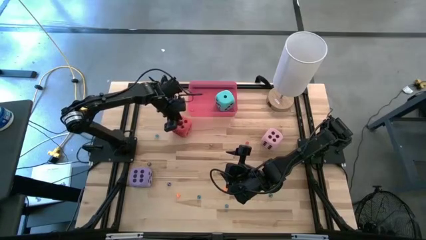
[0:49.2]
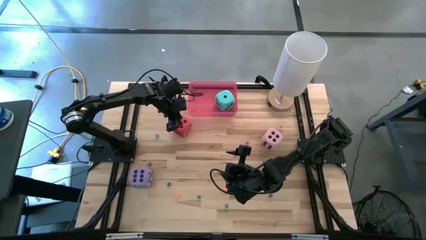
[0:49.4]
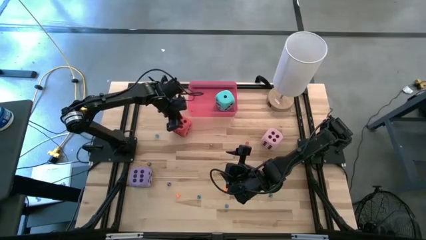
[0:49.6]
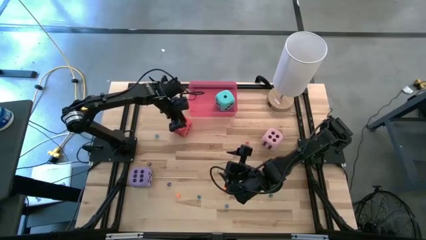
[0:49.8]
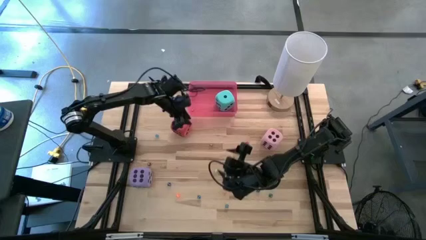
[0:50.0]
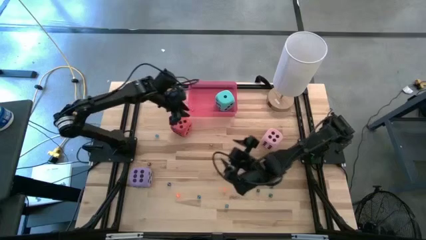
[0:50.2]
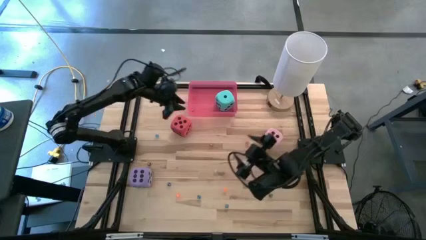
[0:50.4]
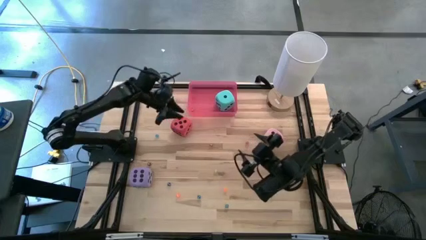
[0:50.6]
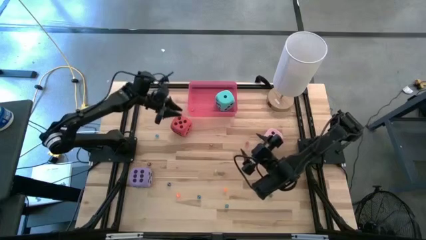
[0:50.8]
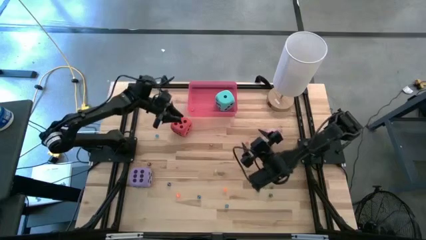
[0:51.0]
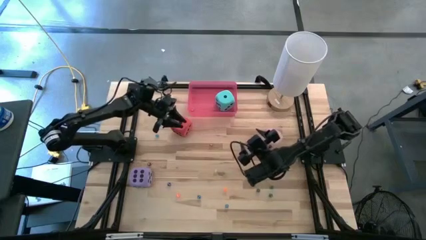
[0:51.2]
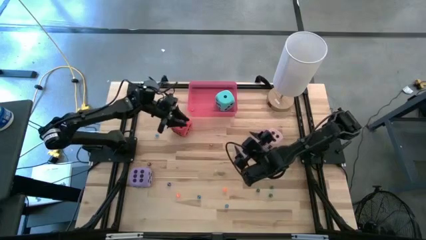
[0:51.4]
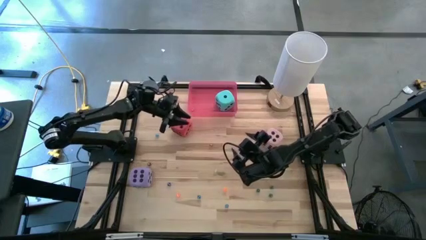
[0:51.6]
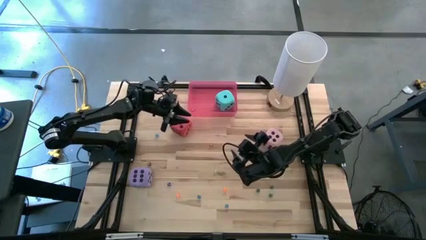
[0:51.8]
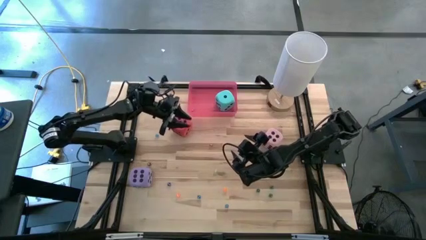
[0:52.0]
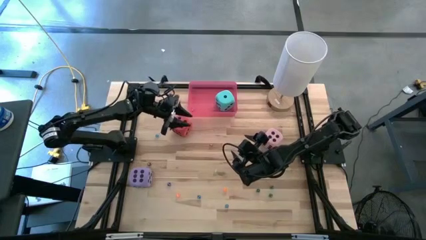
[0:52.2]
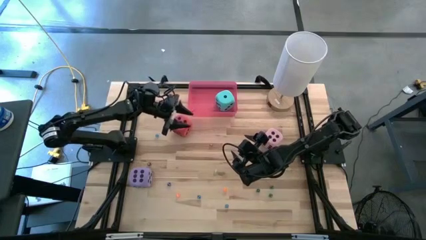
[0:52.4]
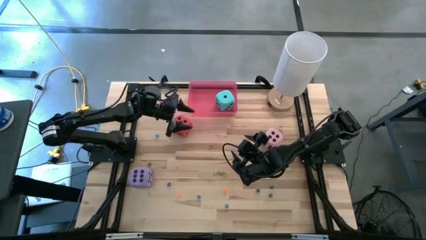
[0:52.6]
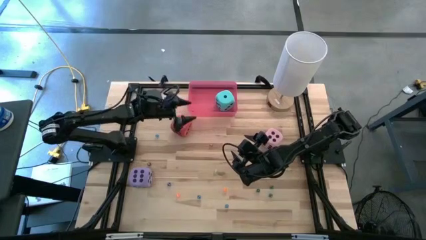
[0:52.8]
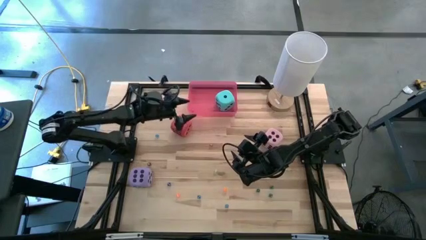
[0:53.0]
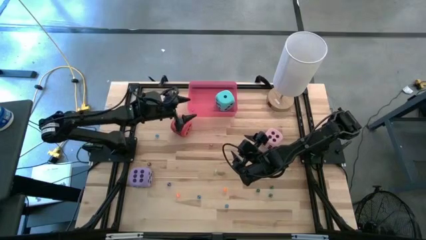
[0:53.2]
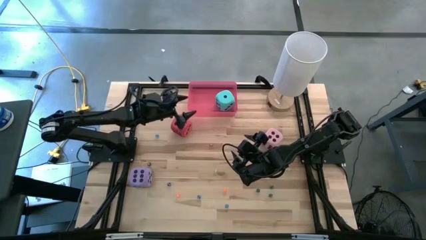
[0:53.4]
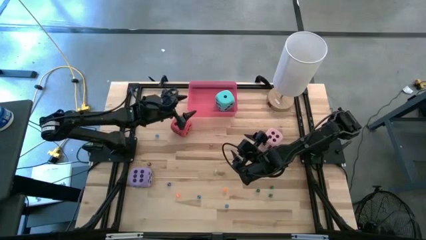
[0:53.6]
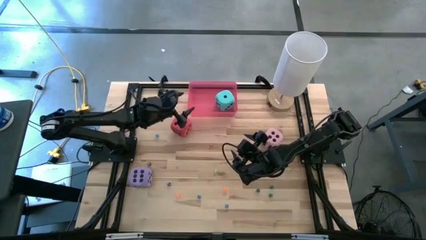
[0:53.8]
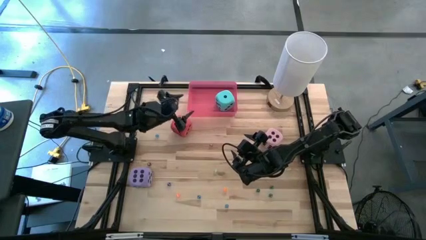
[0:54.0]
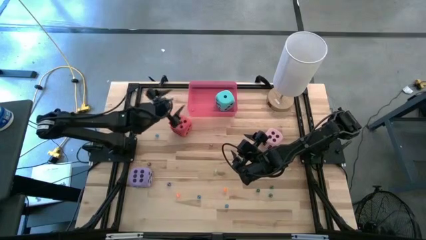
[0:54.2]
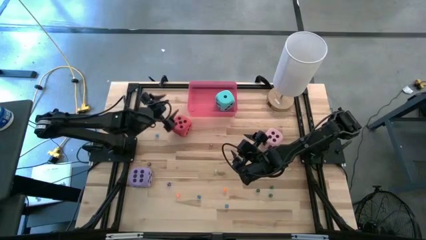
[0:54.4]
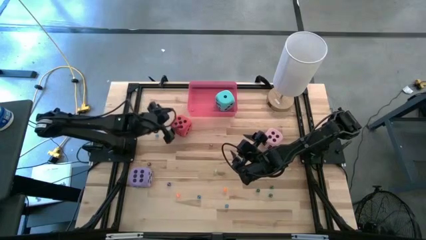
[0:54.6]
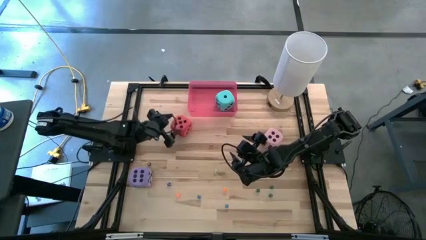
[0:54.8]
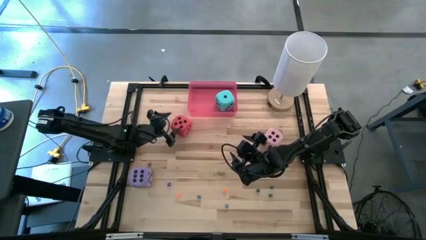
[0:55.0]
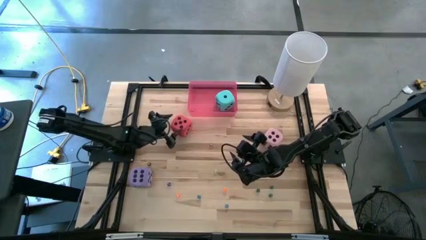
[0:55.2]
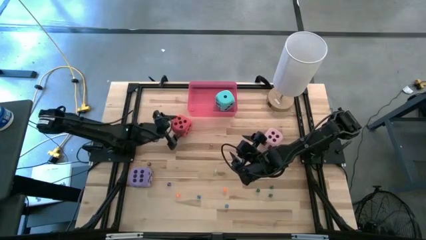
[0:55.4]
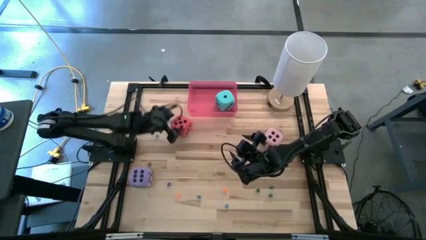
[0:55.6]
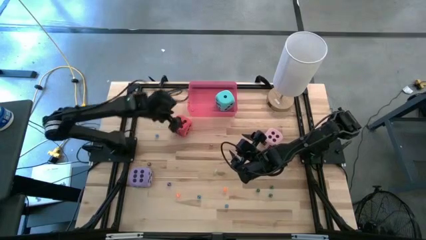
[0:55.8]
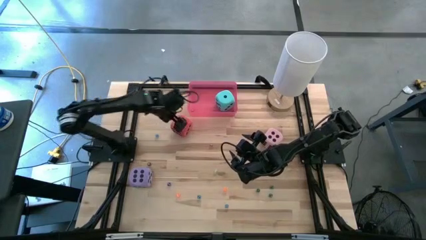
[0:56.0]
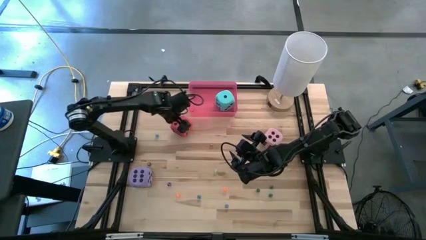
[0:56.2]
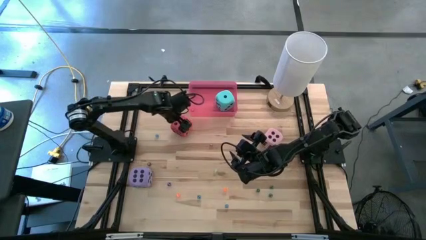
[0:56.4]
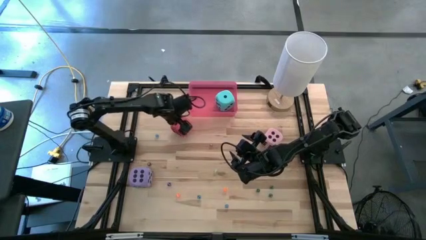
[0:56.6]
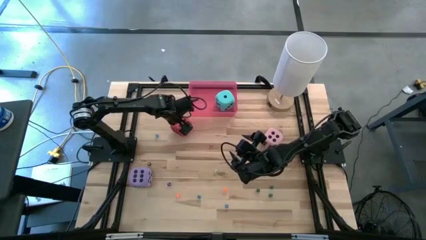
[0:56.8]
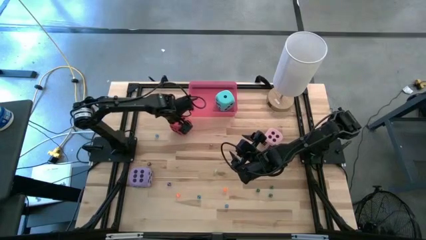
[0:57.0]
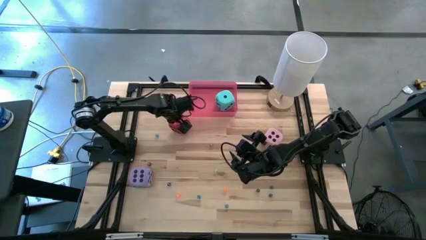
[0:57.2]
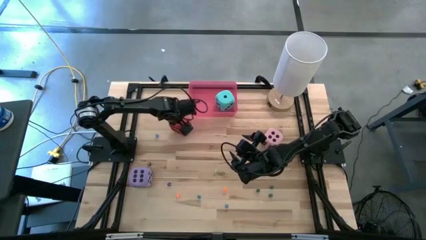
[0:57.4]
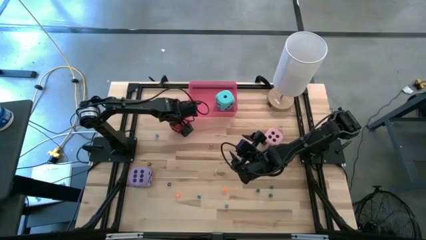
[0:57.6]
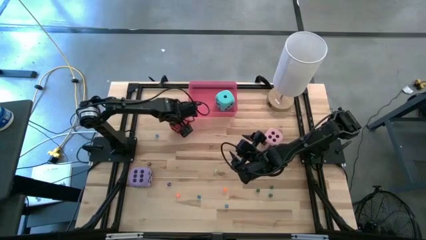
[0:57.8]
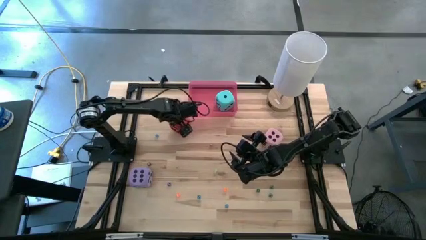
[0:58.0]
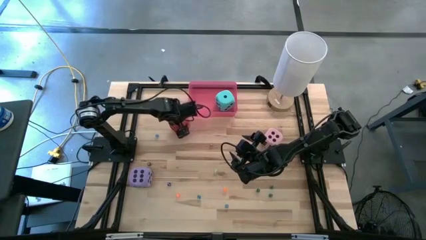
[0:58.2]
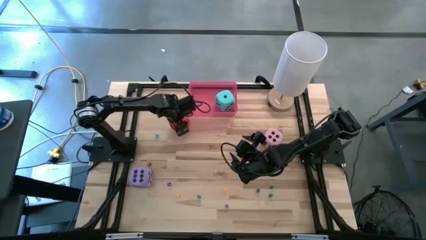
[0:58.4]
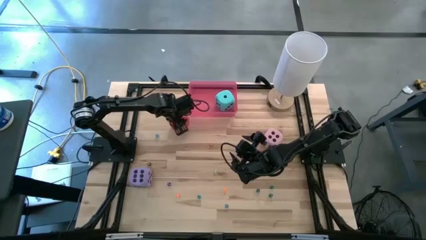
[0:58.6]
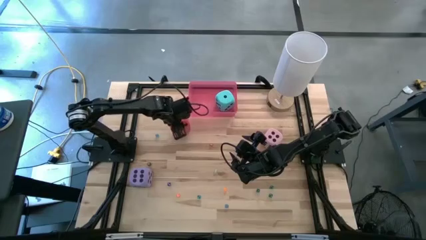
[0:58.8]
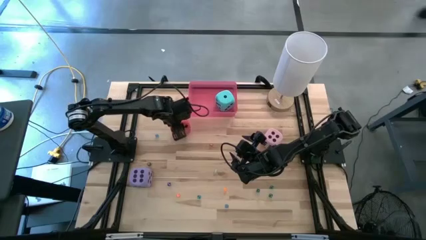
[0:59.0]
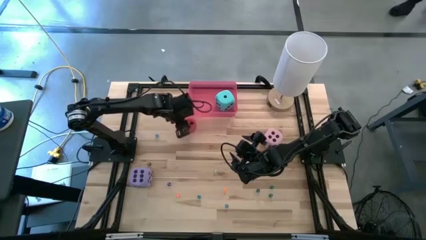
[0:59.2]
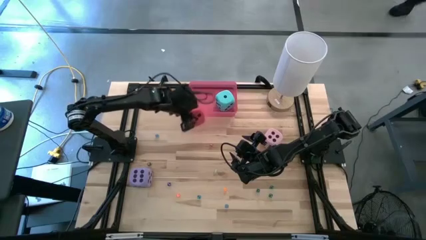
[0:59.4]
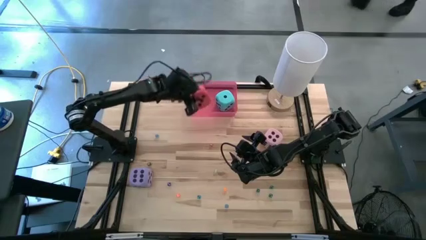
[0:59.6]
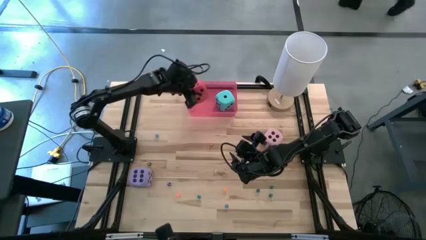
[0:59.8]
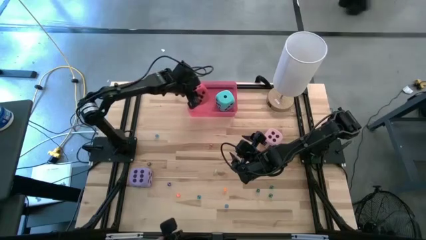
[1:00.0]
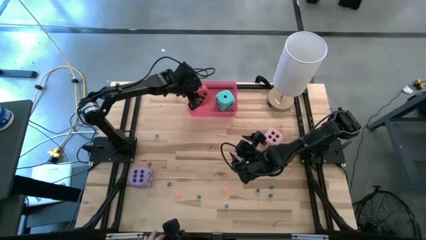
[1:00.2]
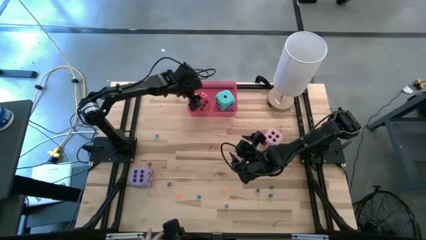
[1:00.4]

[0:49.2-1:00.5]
Task: Pick & Place Dice
Put the large red dice into the pink bin

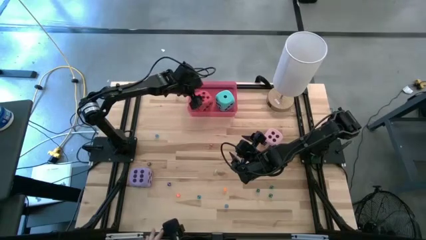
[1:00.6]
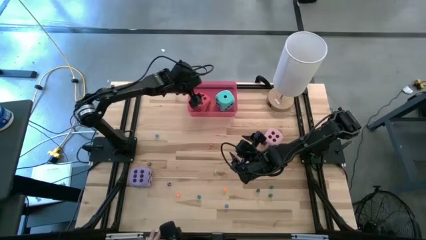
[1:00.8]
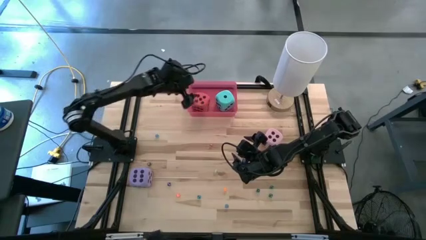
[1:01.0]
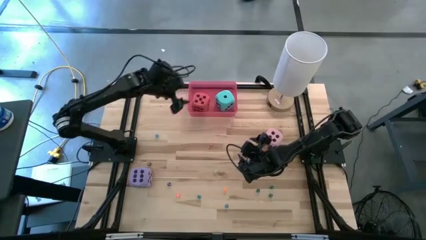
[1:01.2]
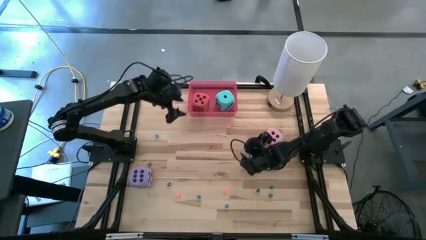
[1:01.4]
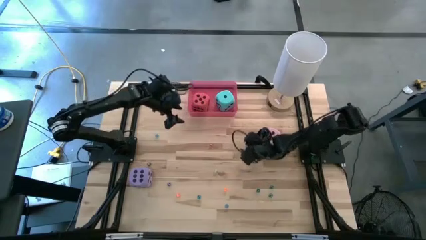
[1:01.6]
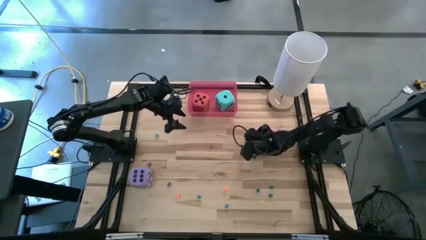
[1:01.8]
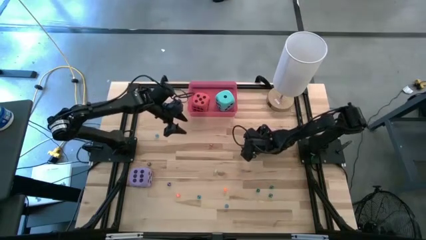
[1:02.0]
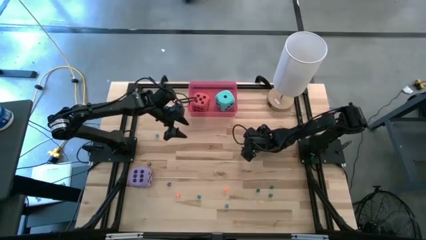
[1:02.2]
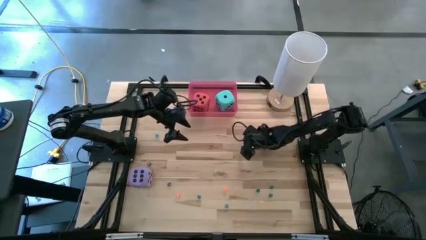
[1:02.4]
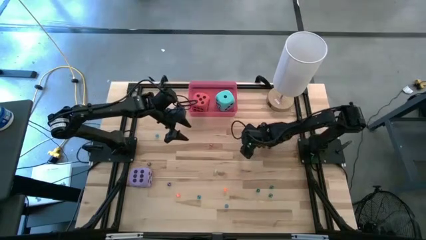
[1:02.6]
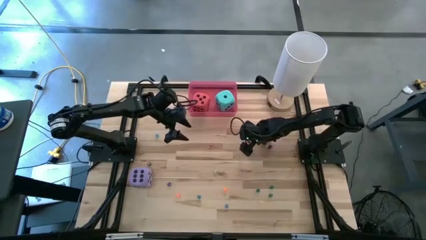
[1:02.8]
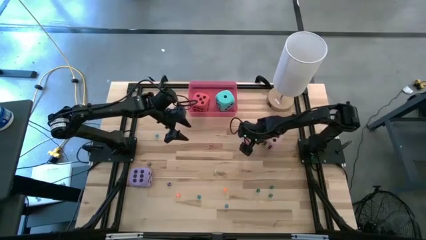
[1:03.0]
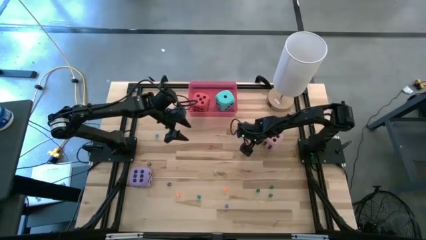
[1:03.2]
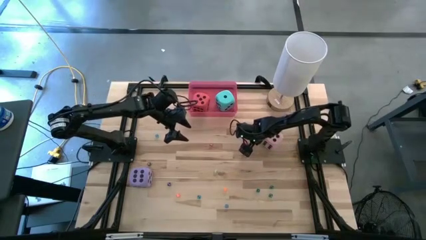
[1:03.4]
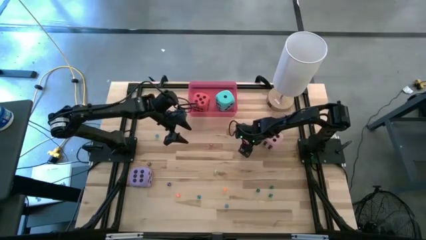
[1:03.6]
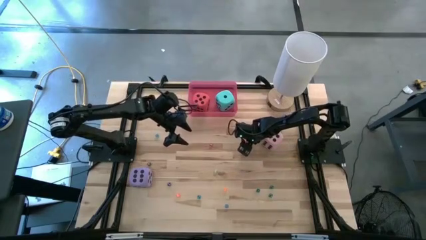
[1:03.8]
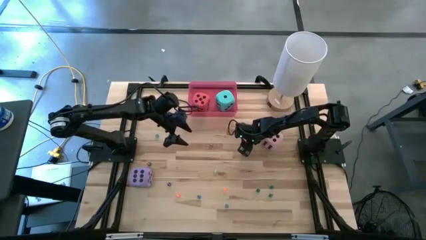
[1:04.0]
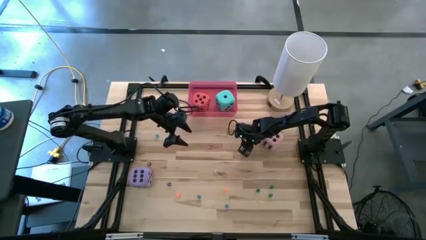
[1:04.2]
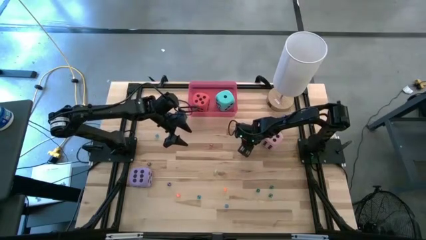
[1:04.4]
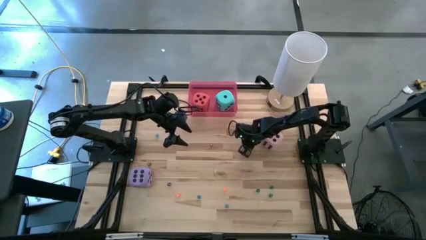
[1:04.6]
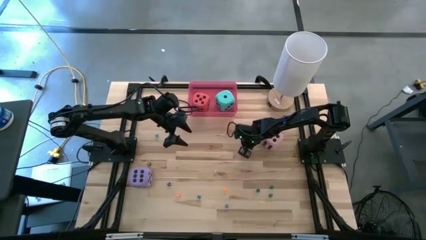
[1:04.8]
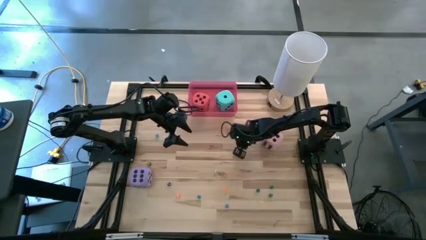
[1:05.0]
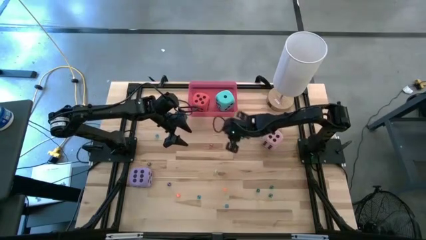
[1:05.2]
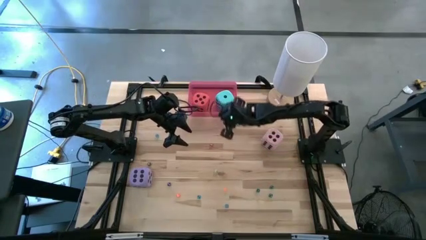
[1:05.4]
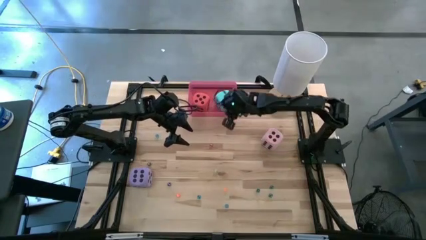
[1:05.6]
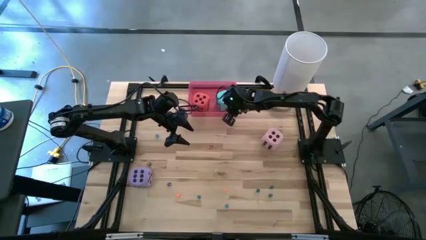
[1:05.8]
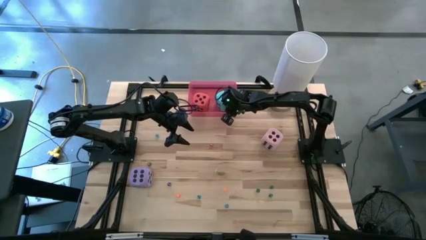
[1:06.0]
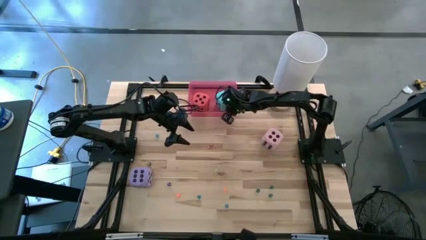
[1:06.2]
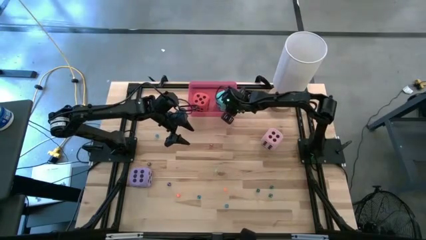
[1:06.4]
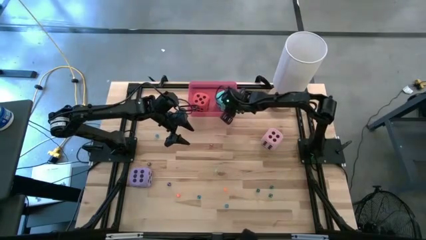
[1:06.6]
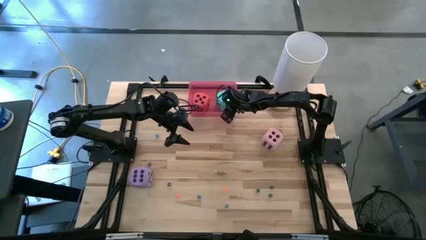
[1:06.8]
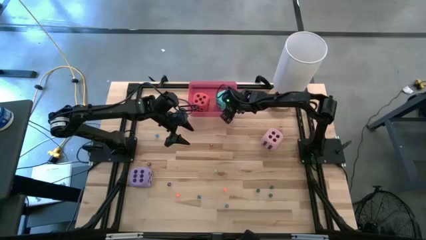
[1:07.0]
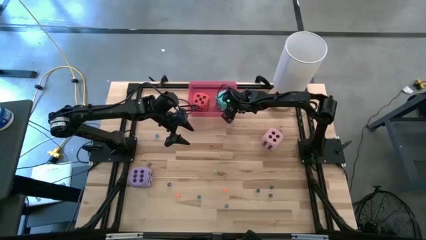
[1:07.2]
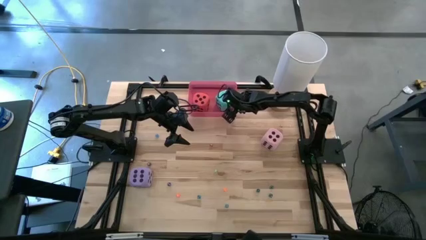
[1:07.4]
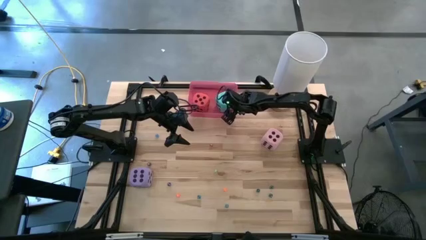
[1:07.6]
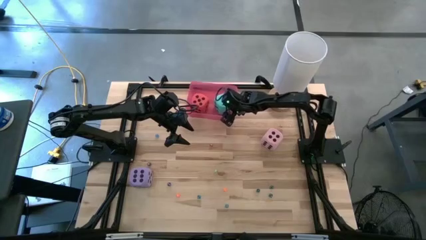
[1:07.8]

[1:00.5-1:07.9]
Put the small red dice into the pink bin
